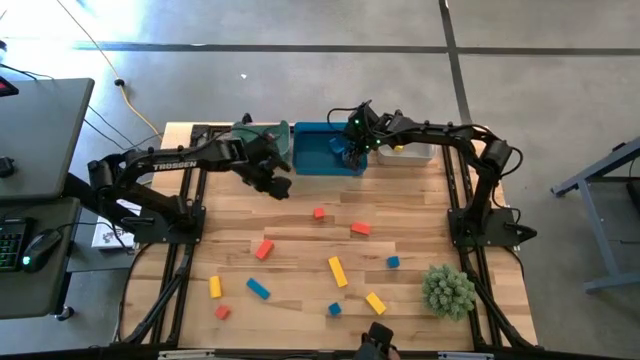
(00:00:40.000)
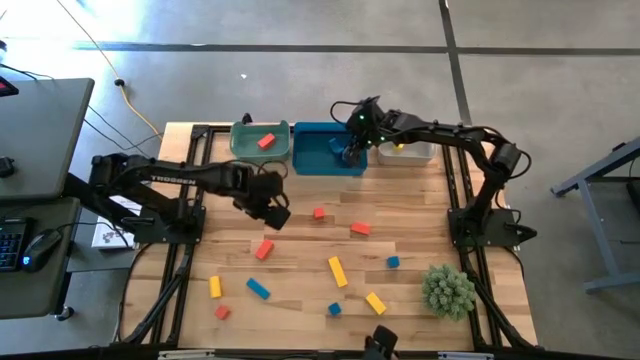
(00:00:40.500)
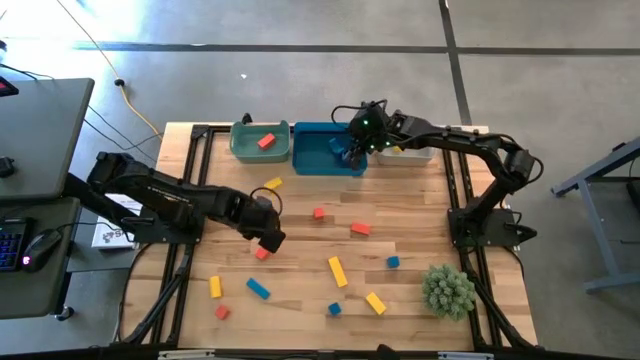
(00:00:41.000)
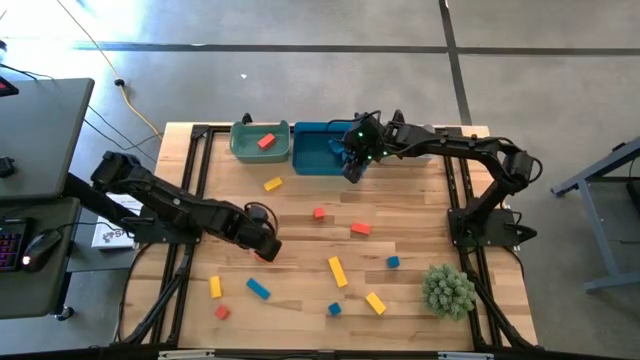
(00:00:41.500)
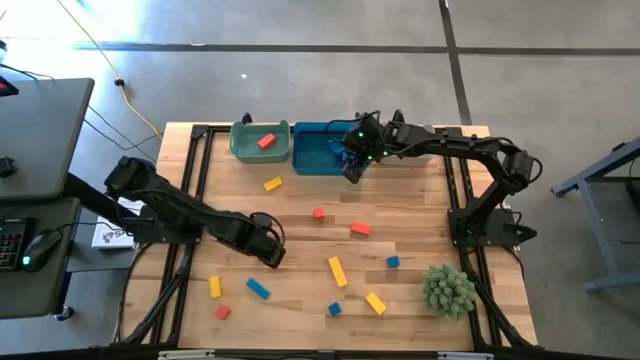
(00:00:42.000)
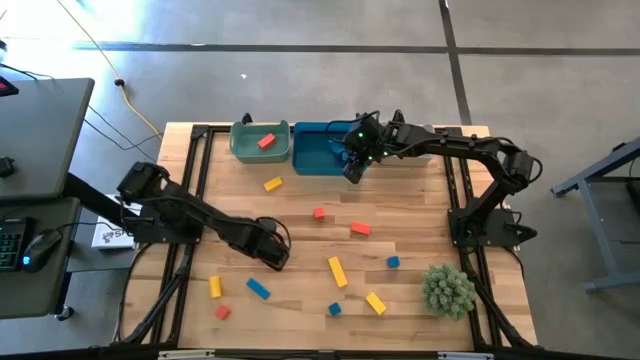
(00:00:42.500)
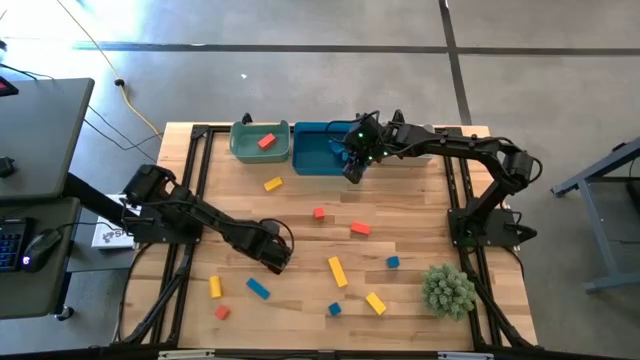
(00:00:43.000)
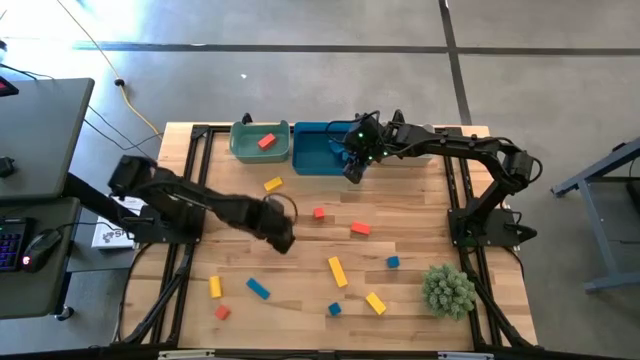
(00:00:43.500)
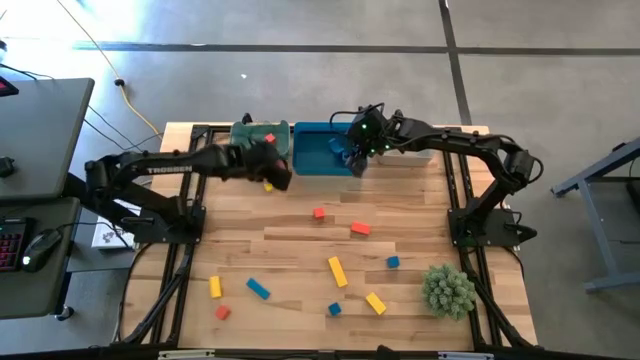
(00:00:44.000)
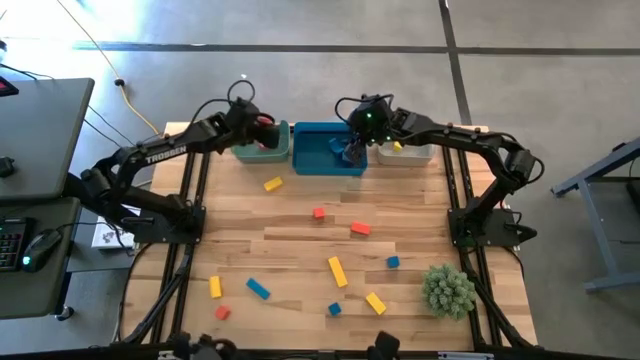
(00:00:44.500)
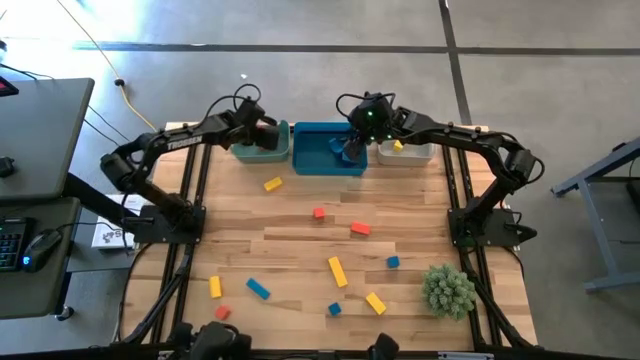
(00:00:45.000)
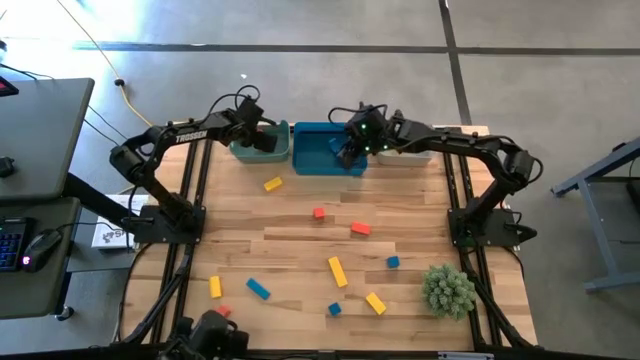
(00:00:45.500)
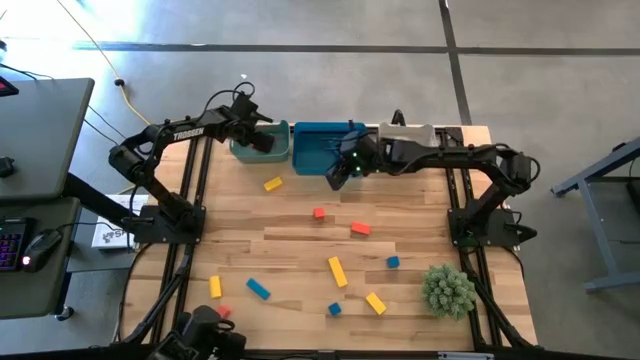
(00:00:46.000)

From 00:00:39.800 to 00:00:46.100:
Task: Sort & place blocks by color
Put the orange block into the green bin

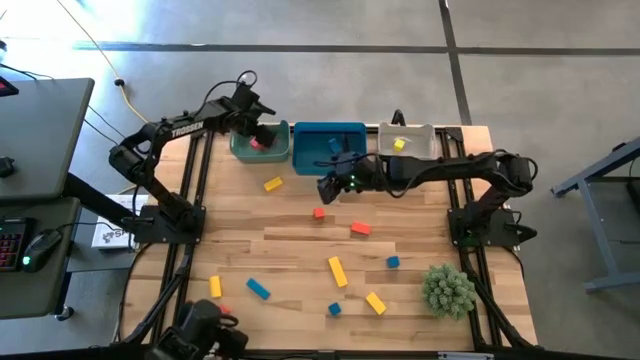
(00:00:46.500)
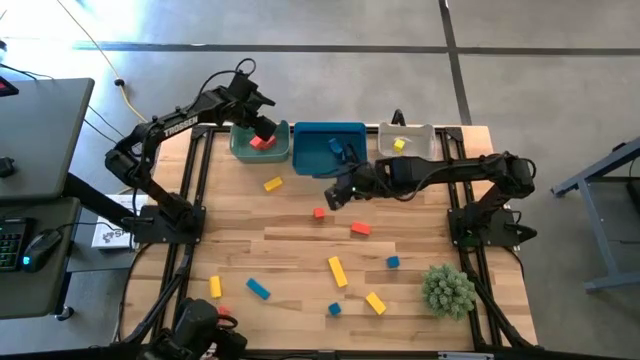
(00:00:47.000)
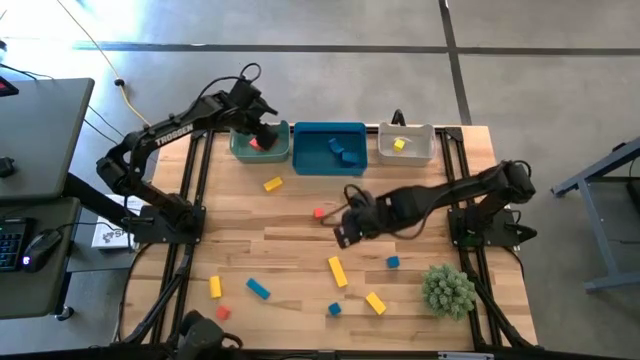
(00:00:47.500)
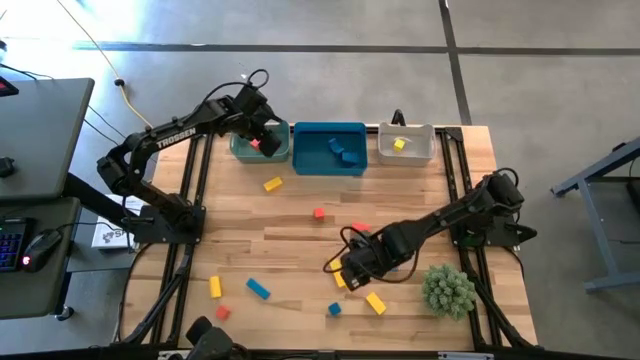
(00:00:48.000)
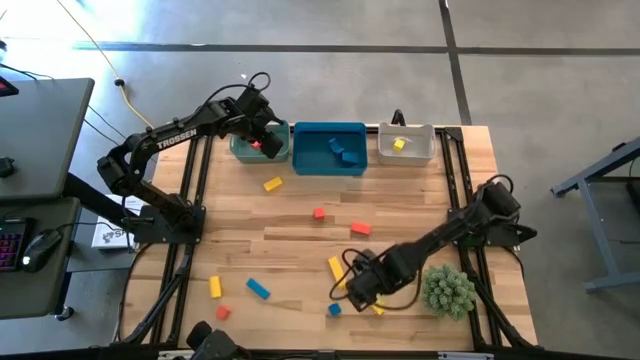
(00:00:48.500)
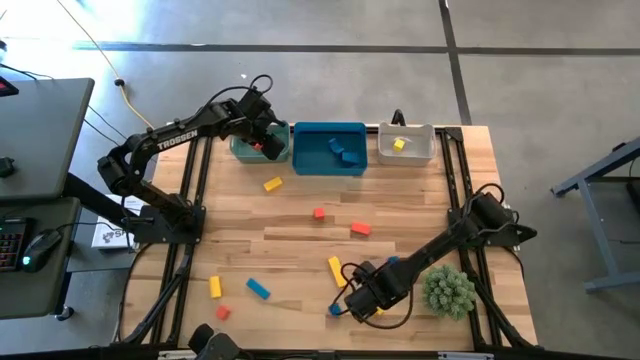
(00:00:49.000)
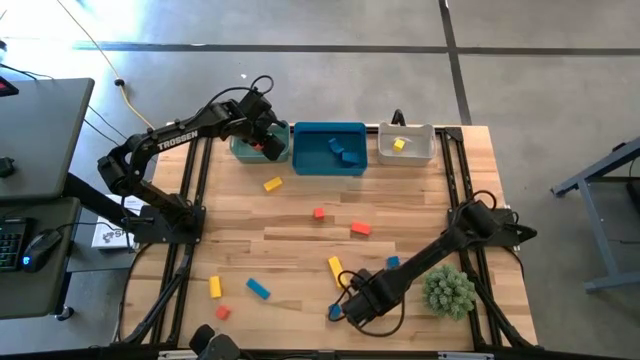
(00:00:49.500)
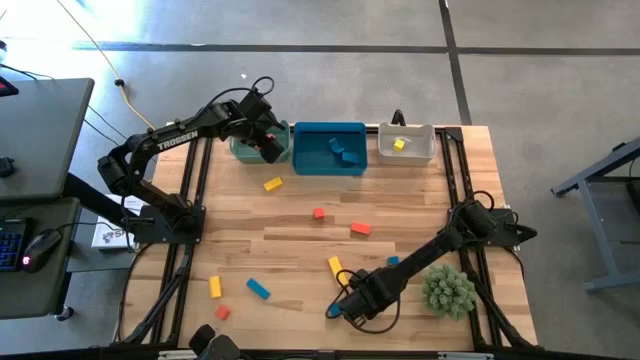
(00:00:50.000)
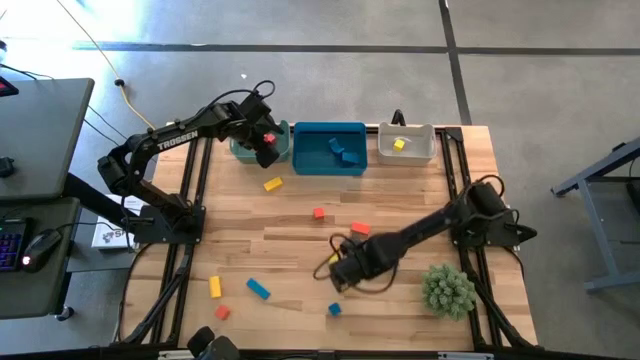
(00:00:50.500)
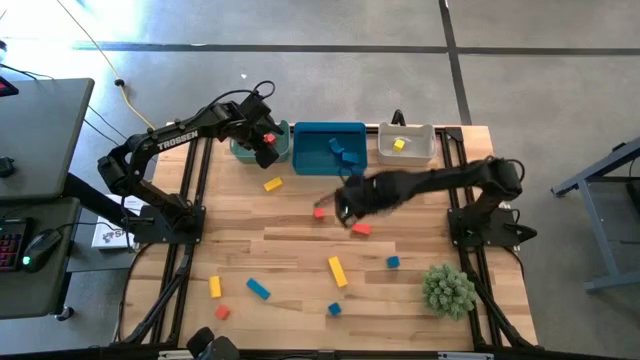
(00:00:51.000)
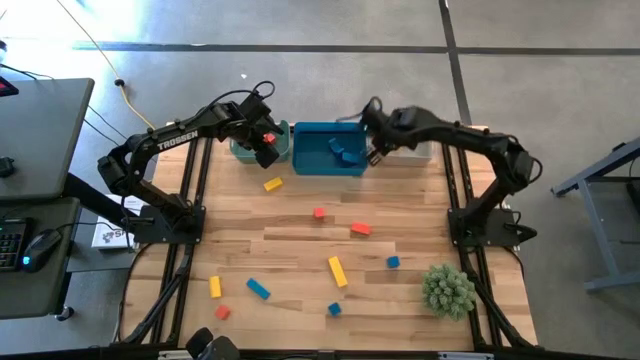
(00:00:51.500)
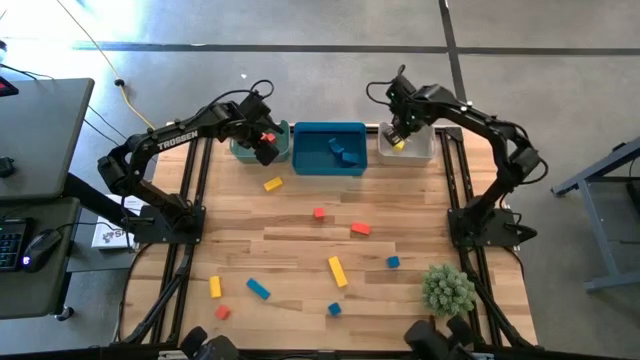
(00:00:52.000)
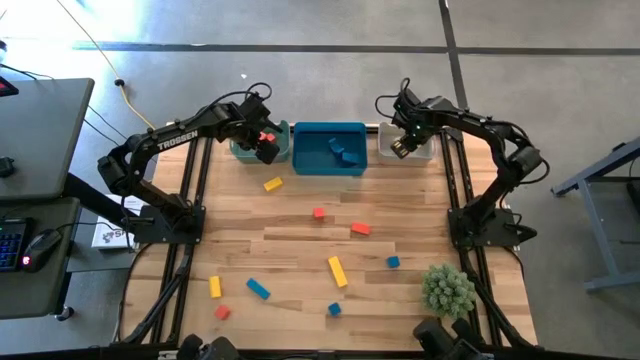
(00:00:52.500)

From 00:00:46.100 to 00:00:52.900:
Put the yellow block into the white bin

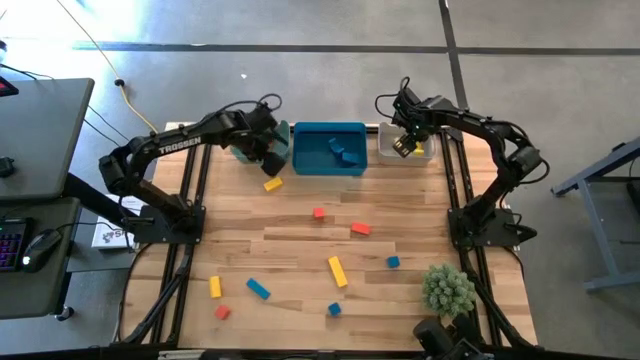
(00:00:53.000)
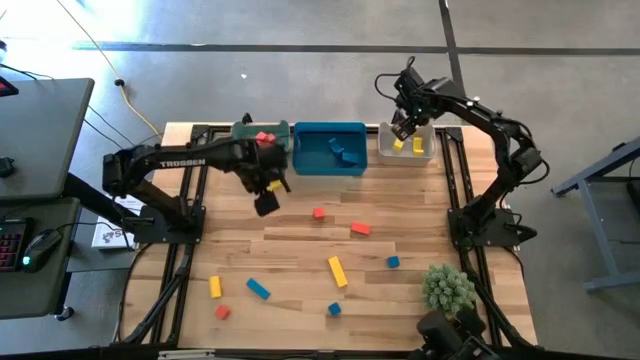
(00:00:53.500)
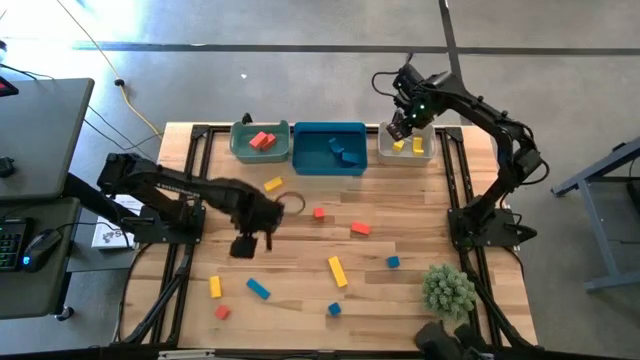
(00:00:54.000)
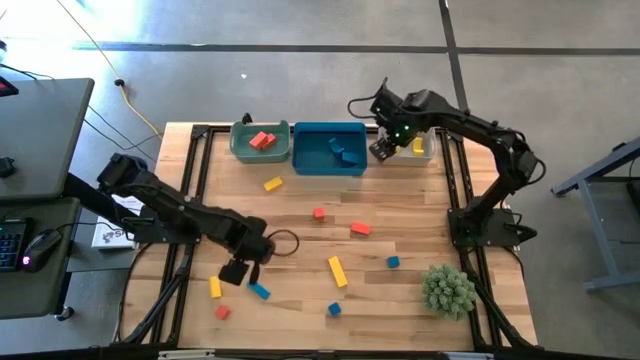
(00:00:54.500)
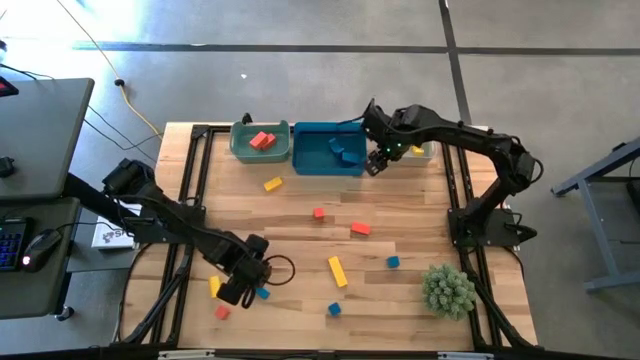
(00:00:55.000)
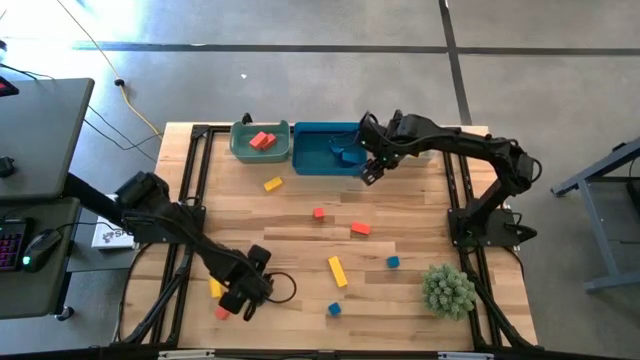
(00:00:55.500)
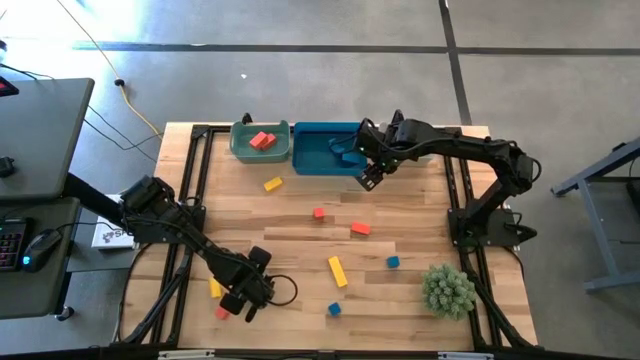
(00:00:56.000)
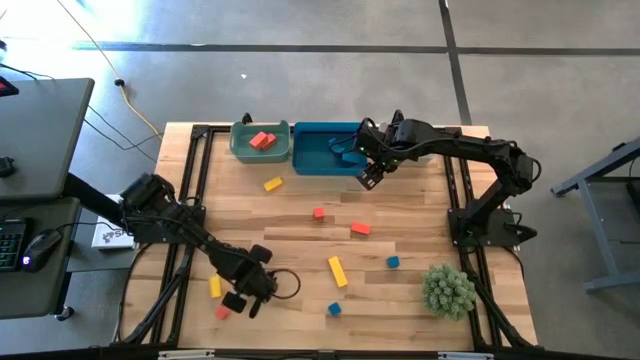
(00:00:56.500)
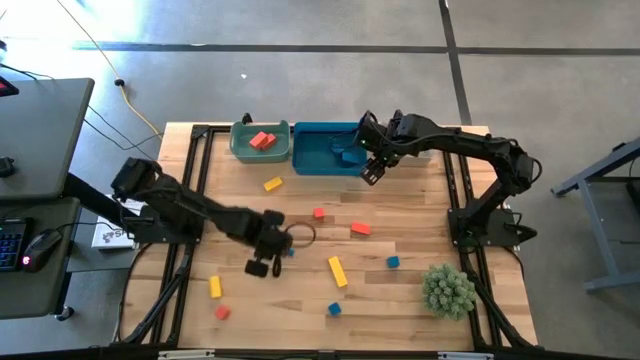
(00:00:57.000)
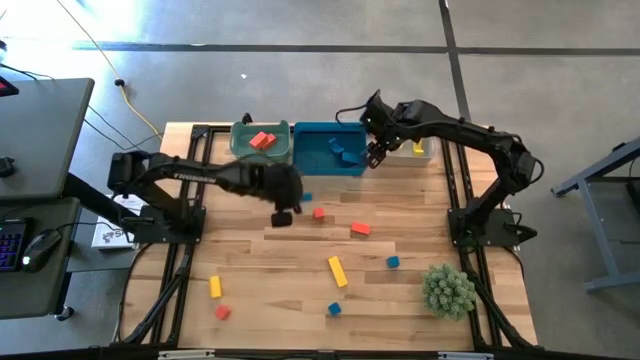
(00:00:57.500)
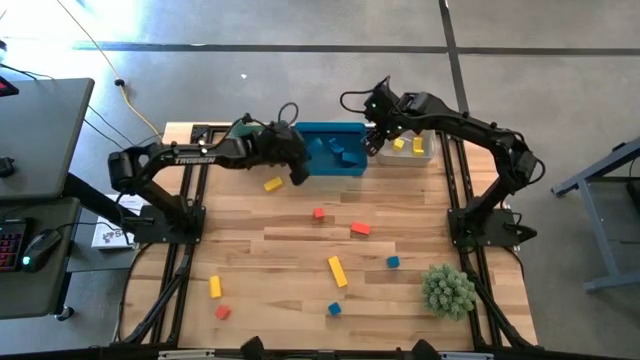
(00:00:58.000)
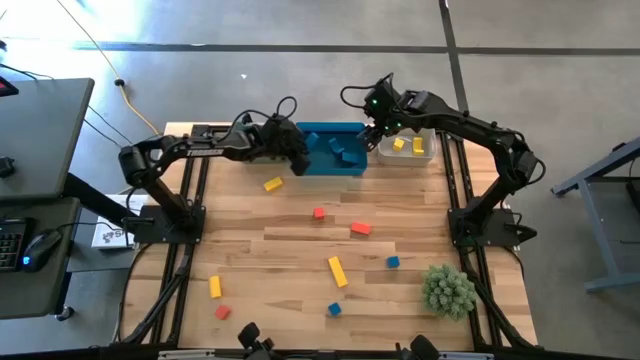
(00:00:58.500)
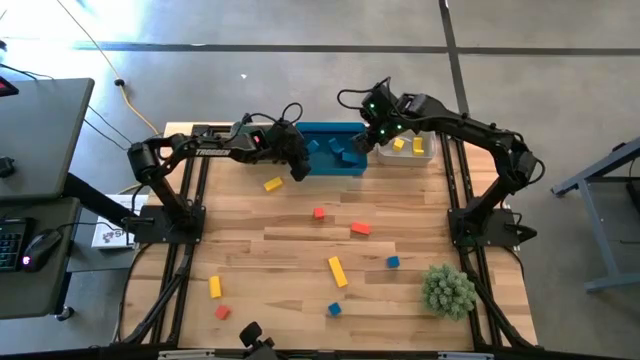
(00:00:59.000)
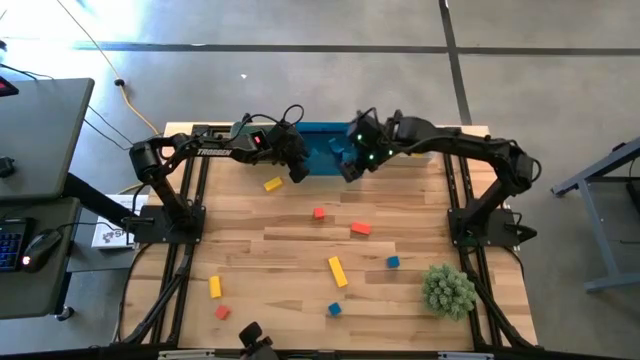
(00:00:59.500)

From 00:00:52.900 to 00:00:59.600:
Put the blue block into the blue bin
